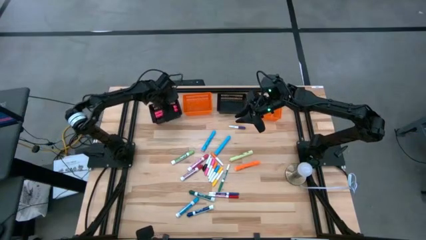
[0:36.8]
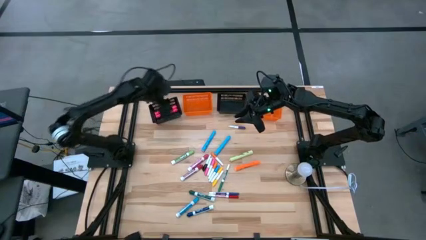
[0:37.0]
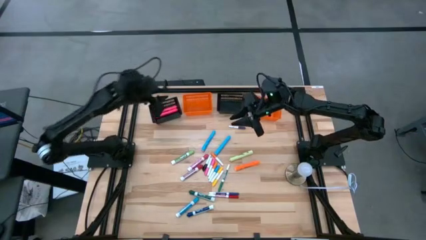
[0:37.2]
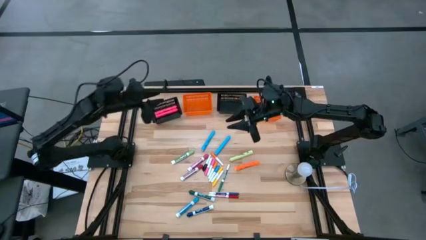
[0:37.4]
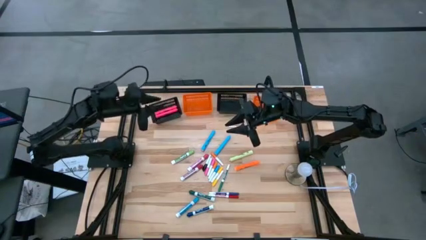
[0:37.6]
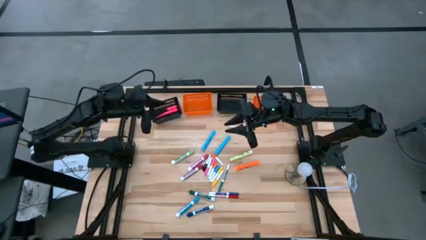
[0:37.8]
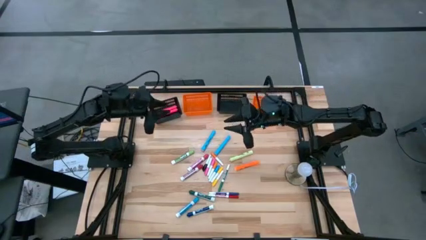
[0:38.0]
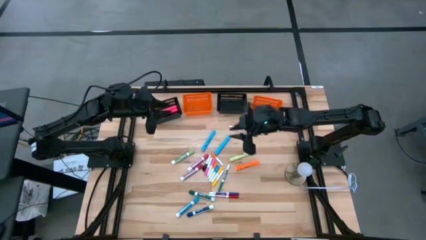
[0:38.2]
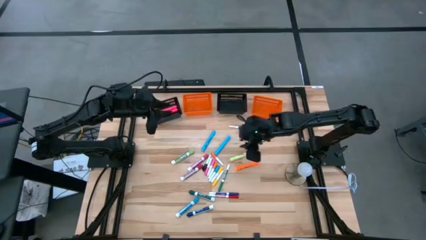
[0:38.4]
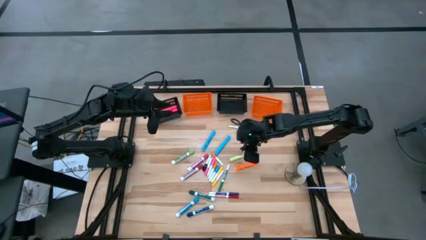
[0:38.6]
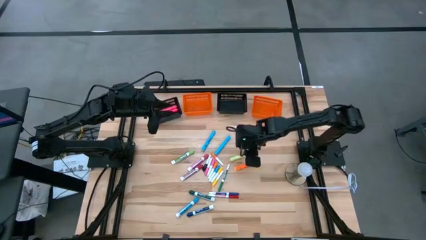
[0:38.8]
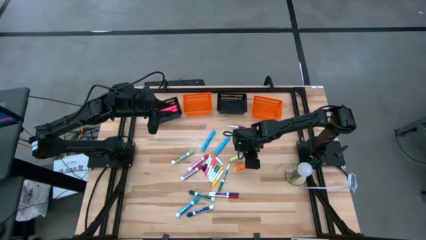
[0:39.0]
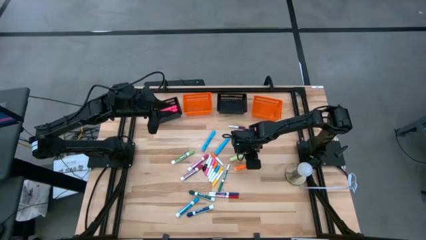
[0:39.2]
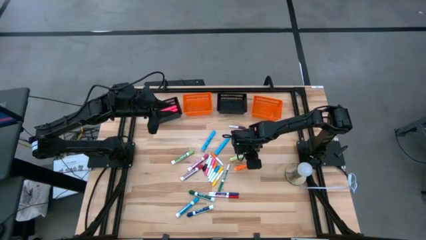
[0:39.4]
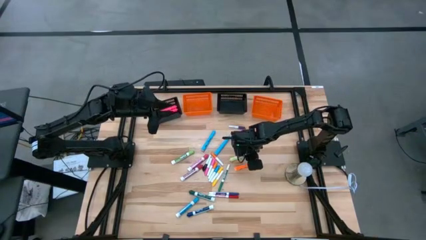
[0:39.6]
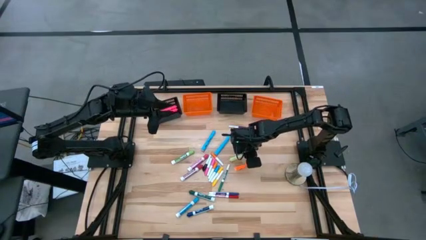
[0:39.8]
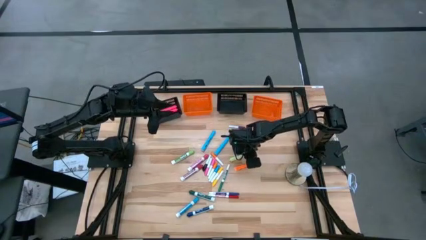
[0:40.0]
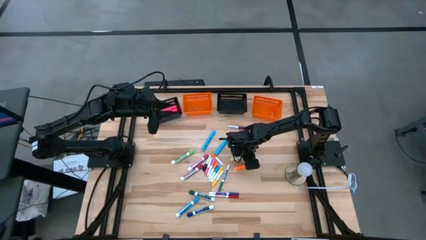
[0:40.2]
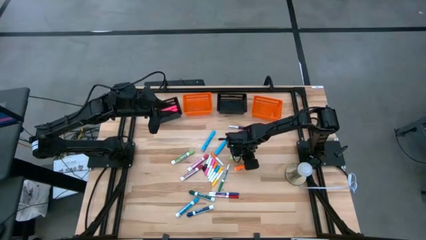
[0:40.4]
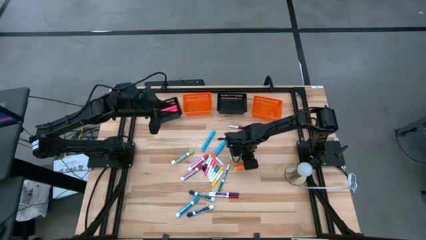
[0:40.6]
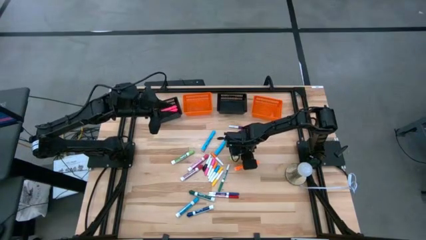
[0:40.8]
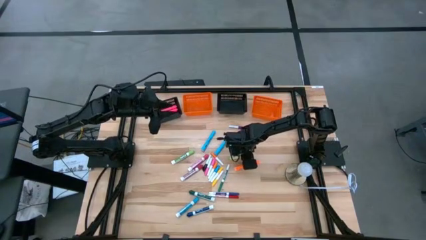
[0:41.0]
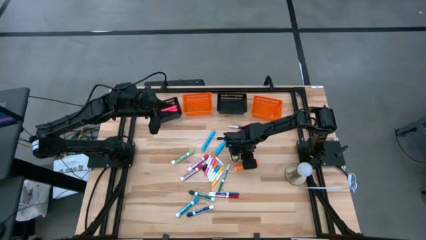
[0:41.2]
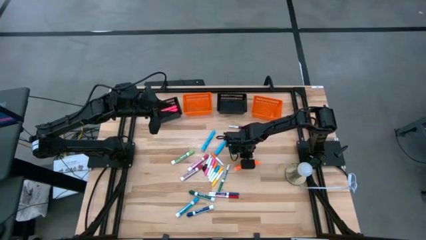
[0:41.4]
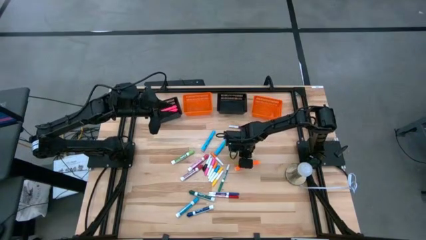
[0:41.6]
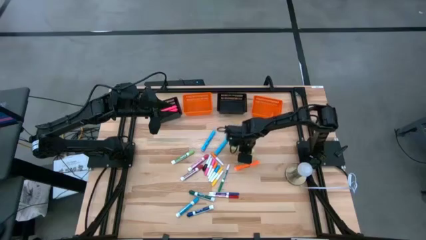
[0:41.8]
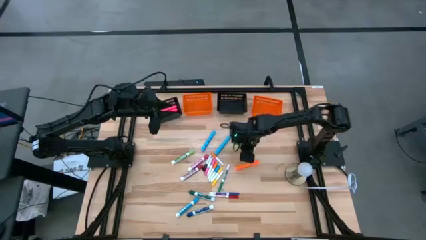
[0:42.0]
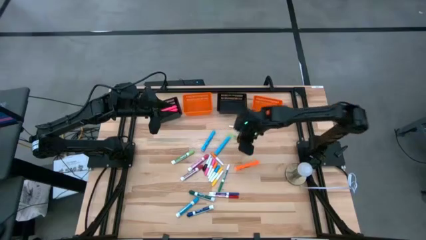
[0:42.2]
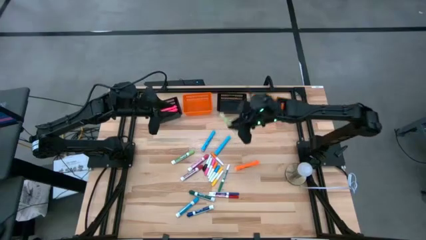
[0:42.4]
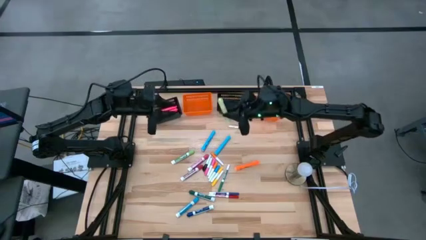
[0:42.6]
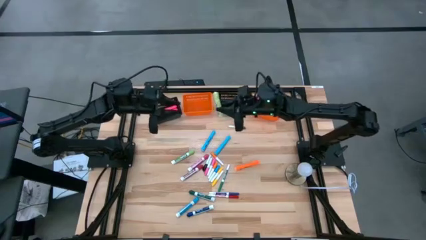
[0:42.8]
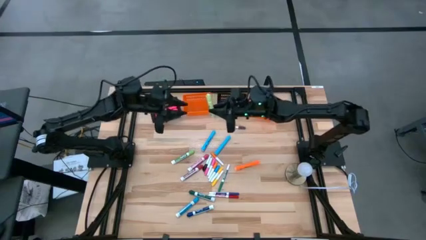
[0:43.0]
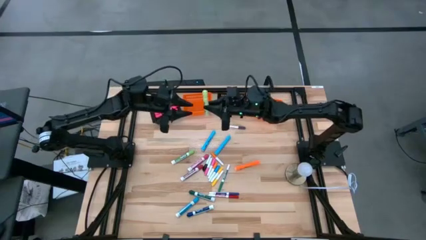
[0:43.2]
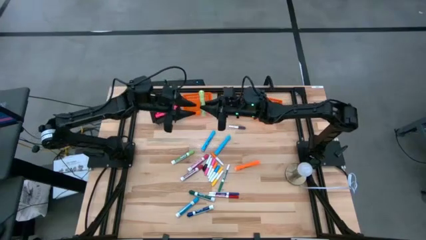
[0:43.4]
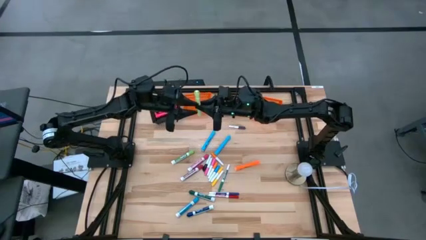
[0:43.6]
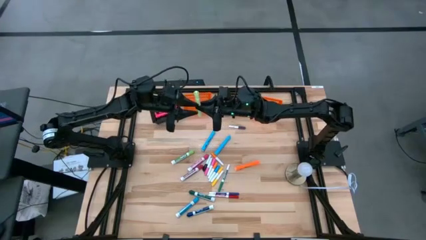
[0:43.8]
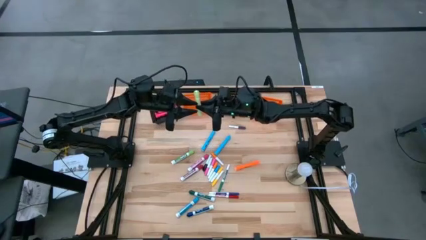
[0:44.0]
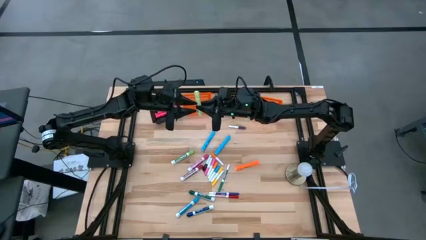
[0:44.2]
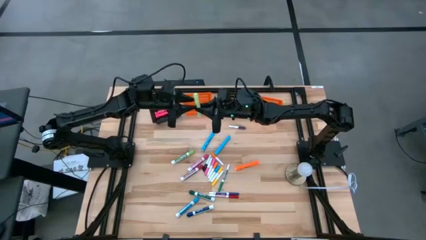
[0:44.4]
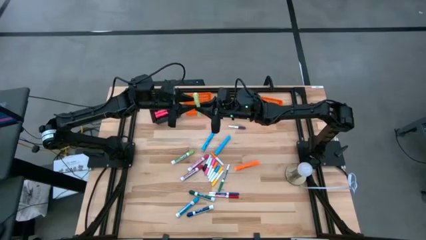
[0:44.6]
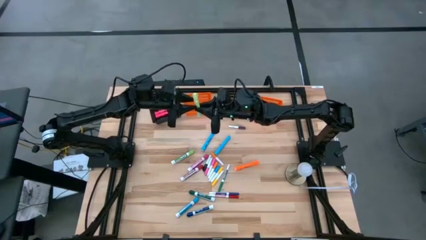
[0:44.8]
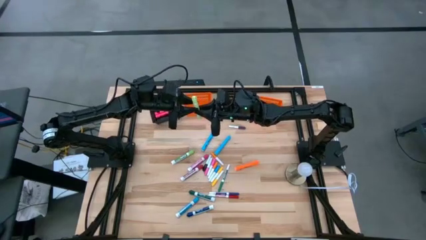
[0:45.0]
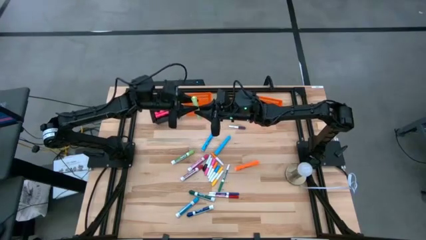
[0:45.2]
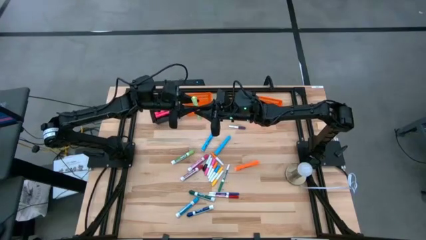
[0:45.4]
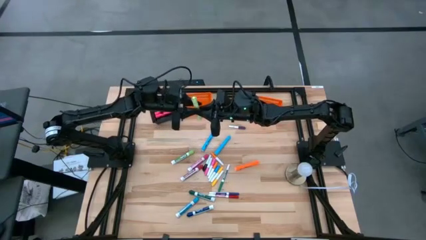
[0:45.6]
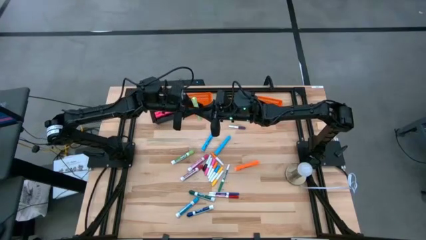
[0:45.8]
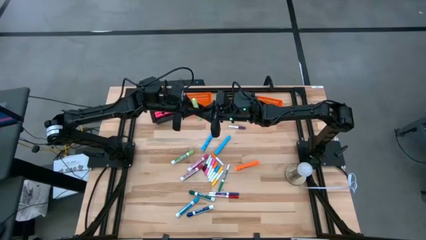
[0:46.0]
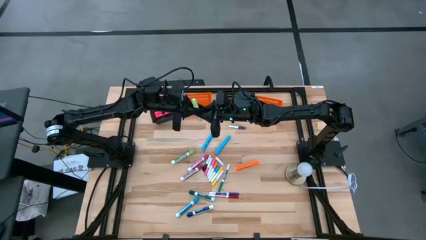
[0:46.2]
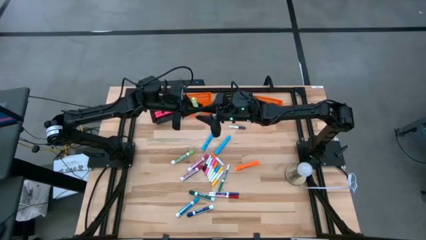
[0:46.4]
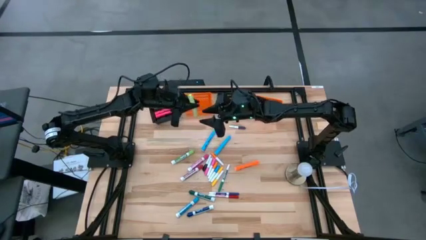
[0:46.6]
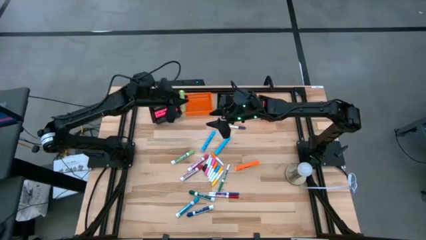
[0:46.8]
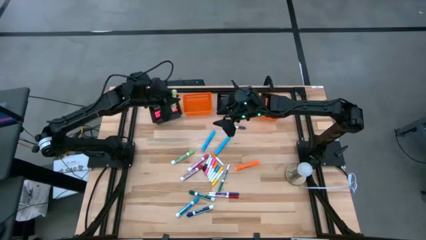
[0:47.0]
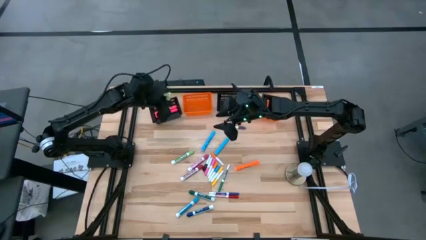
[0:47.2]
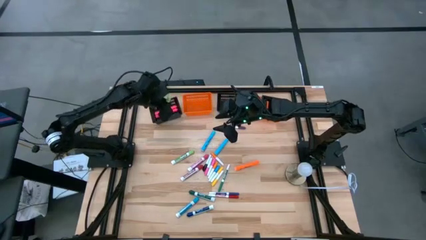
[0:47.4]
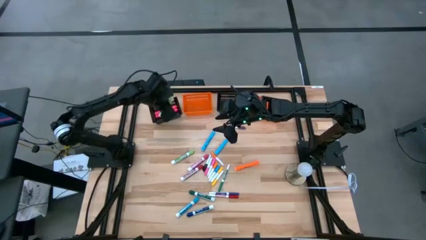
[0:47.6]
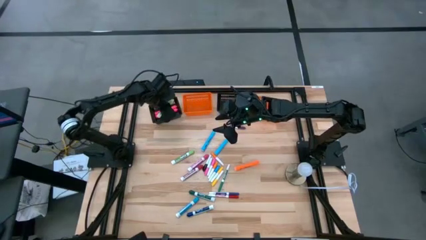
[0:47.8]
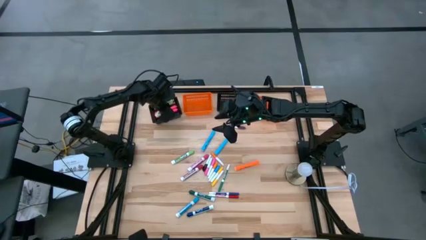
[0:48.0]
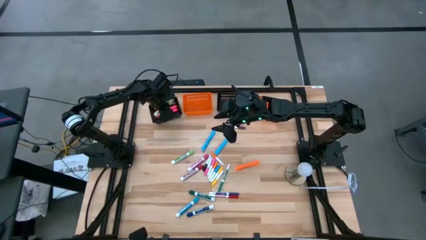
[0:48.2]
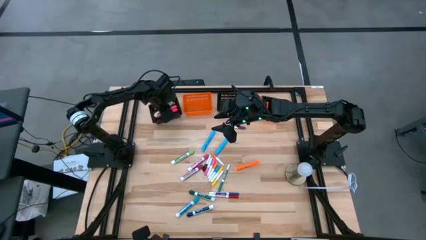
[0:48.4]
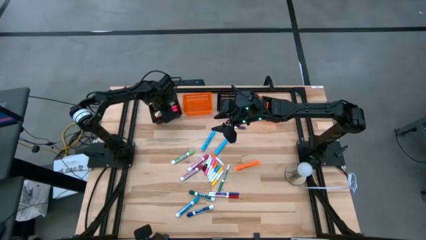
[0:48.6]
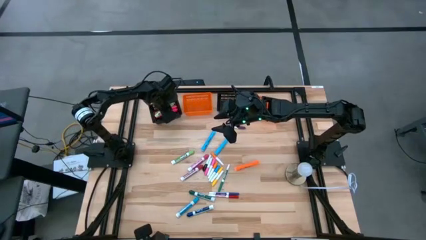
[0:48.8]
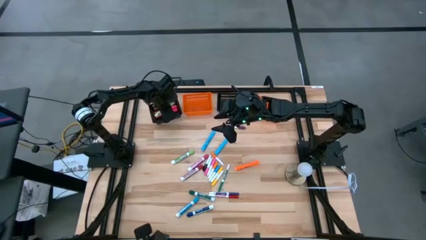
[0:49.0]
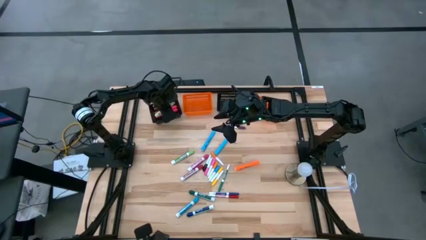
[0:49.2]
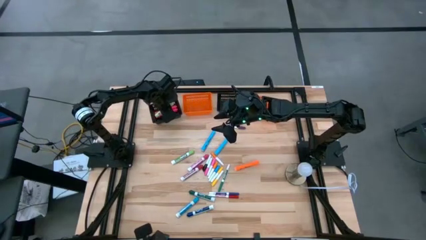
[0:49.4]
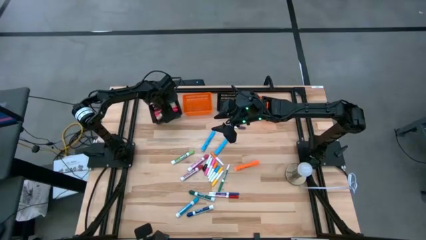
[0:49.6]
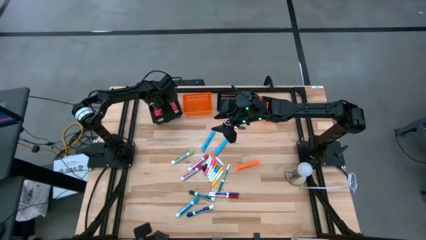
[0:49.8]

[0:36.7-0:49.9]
Task: Pick & Place Markers
Put the light green highlighter into the left black bin

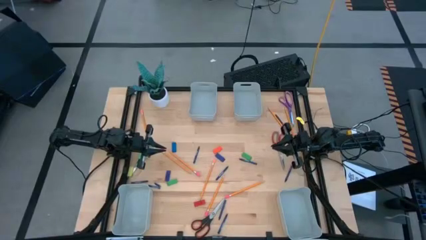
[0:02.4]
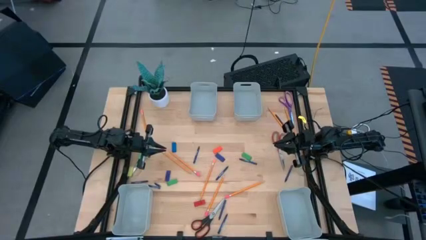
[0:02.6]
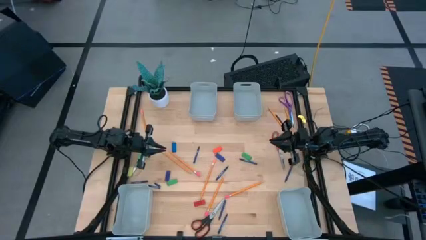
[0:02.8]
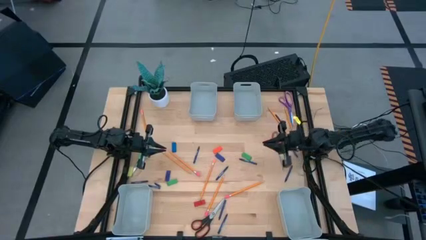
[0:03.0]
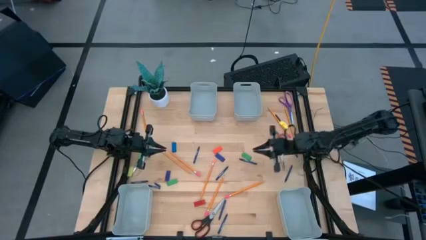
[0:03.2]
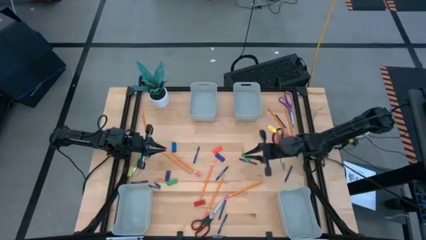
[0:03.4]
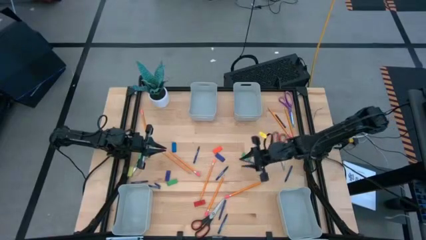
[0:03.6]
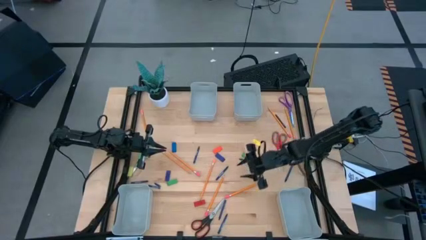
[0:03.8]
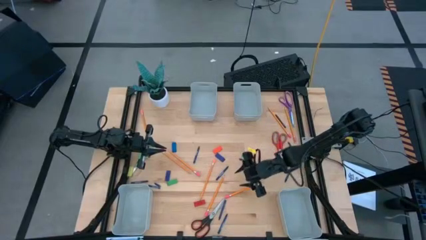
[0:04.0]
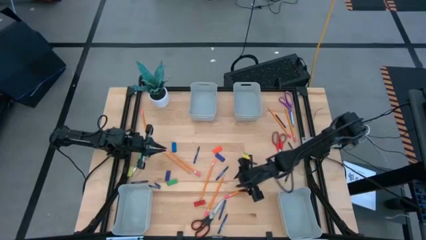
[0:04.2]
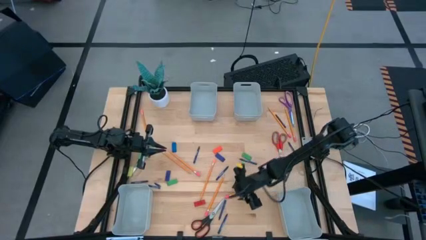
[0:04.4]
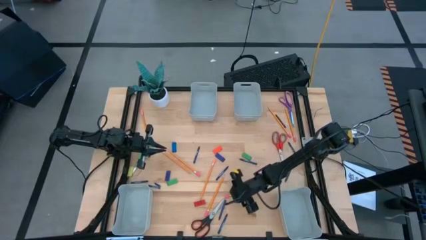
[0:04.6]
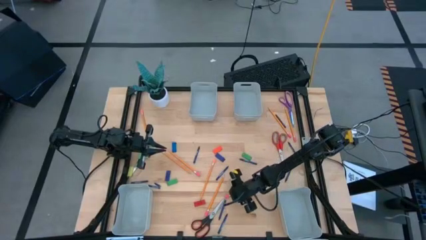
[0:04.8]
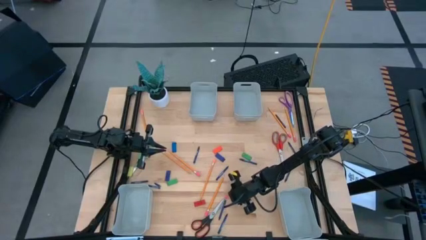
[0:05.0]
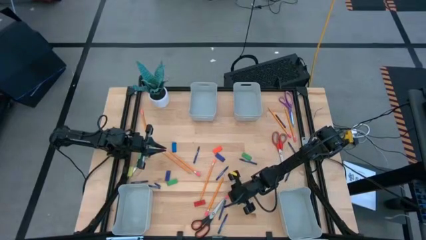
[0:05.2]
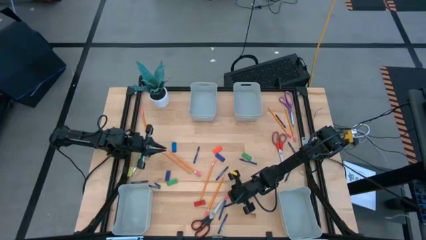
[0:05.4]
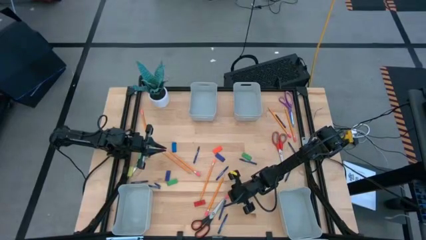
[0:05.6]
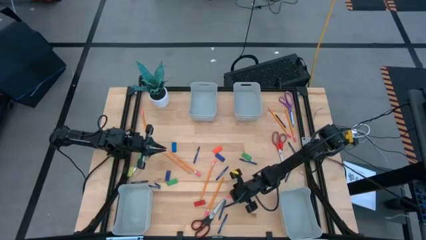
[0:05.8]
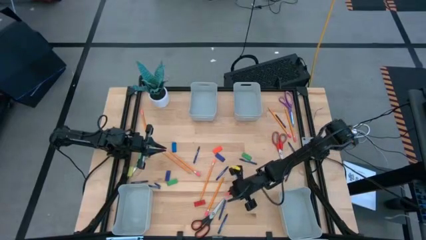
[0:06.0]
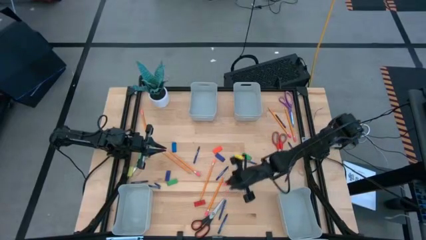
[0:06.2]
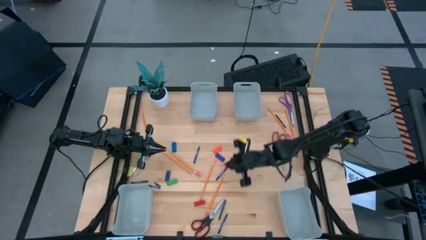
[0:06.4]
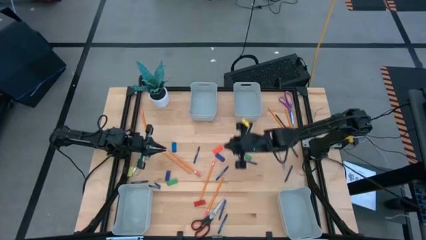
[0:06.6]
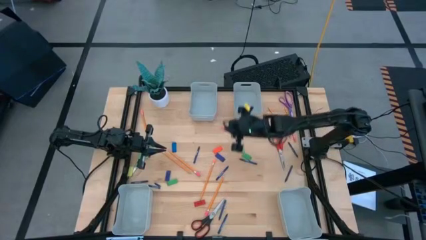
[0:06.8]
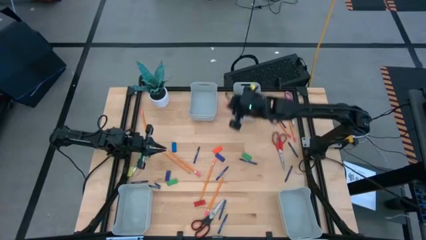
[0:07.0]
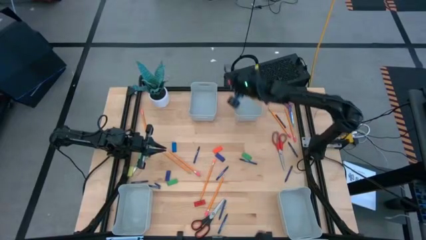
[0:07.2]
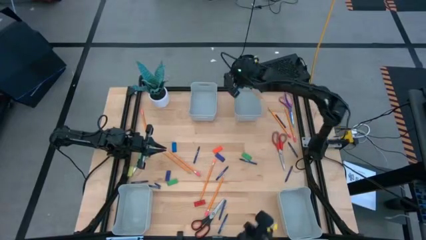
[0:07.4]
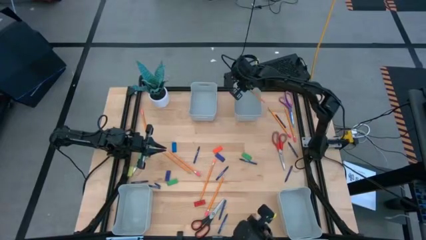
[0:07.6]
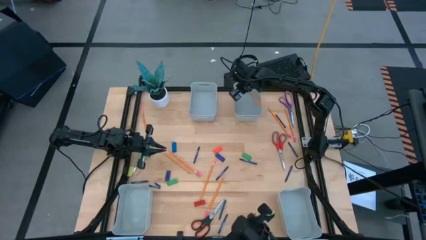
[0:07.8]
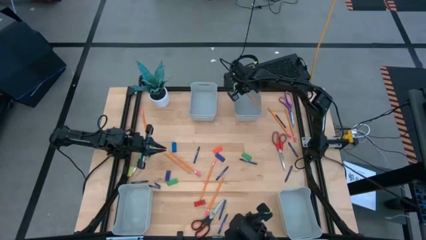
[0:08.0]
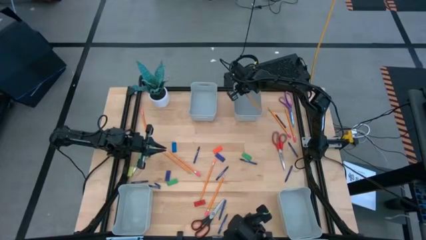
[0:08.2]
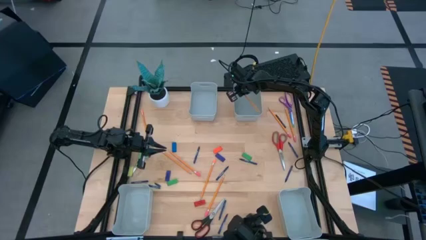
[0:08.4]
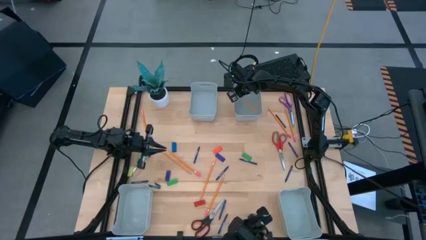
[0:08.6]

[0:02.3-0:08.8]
Task: Sort crayons/erasers/pens/pencils in bins
Put the yellow pencil into the top right bin
